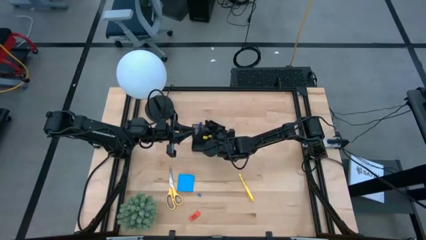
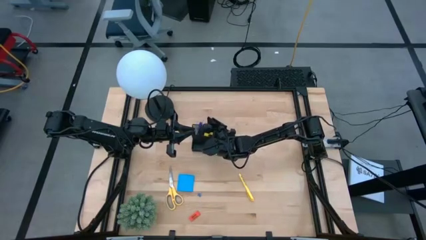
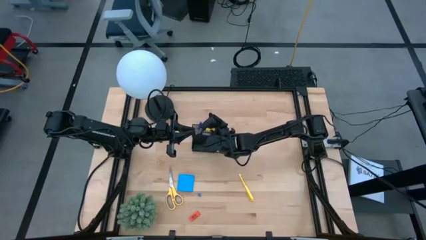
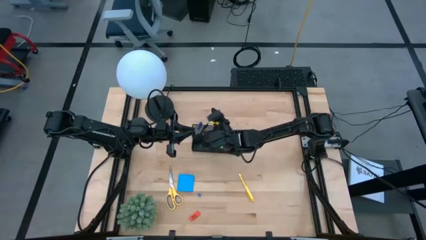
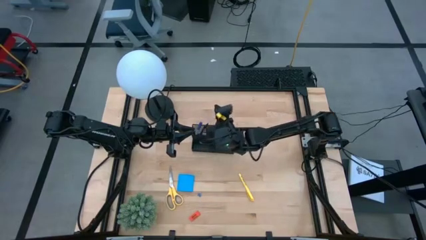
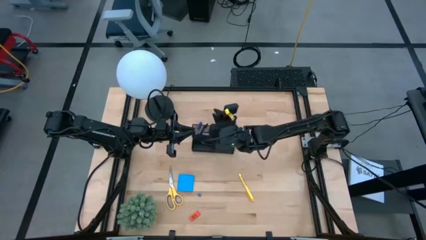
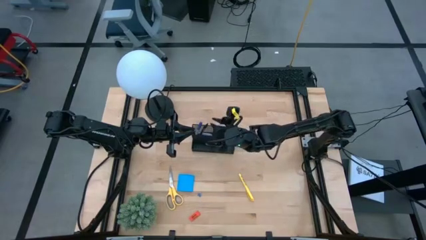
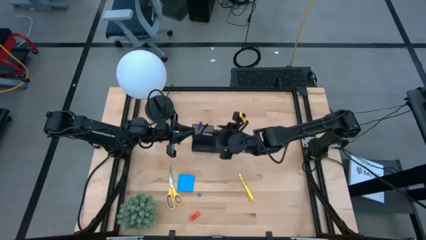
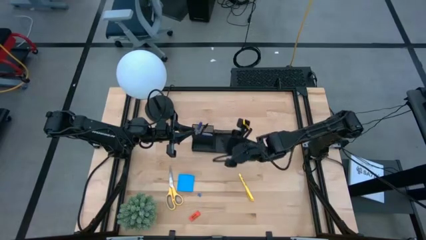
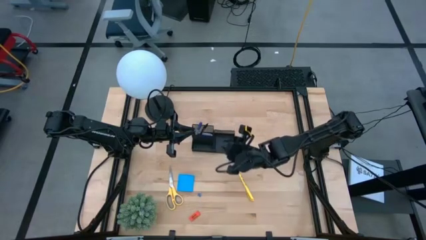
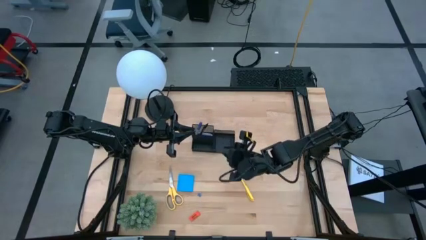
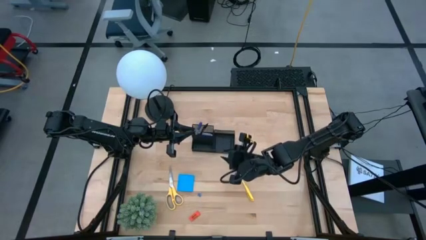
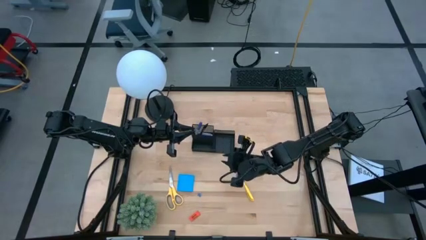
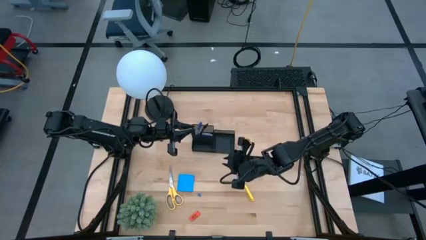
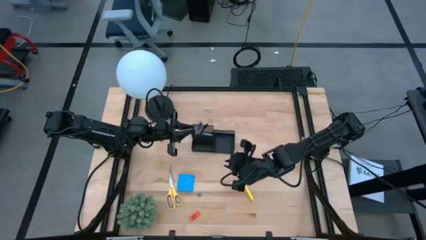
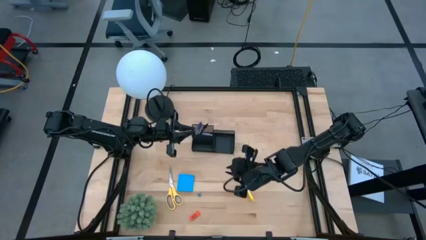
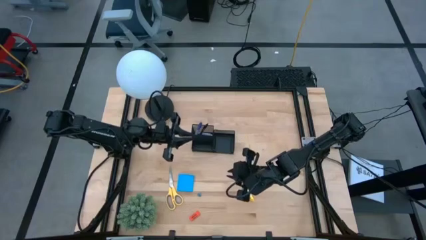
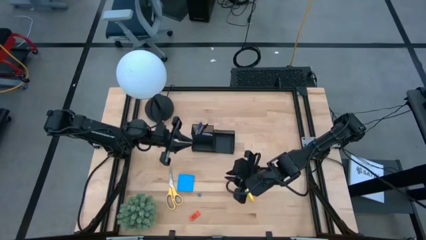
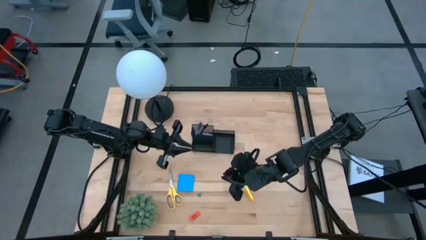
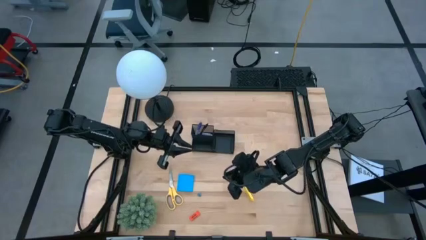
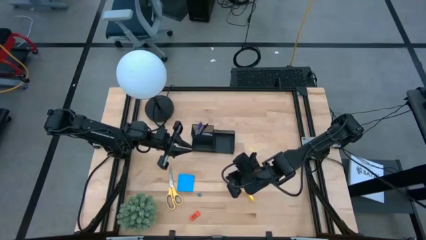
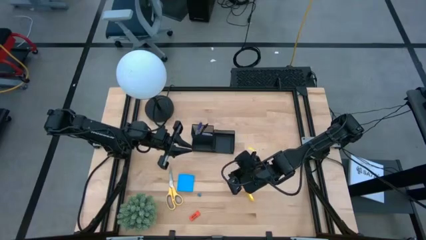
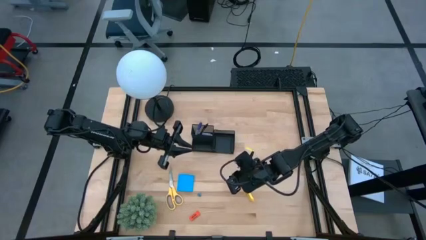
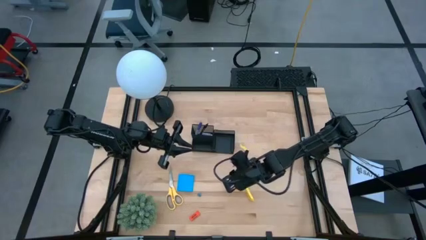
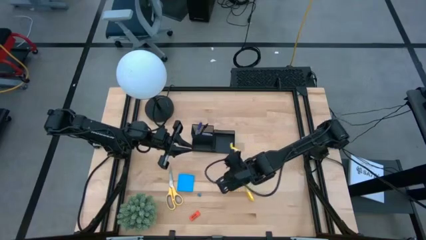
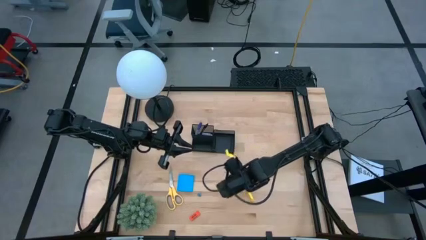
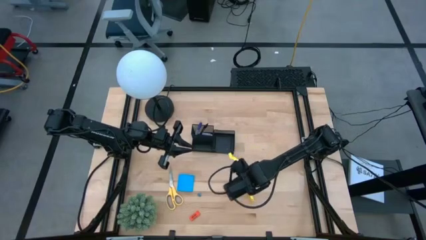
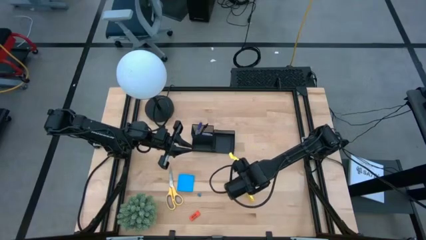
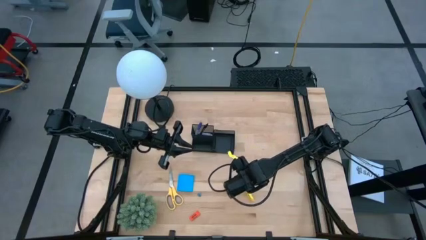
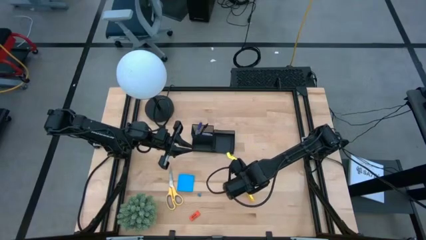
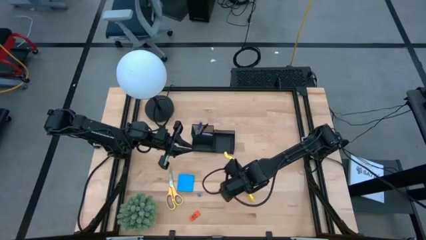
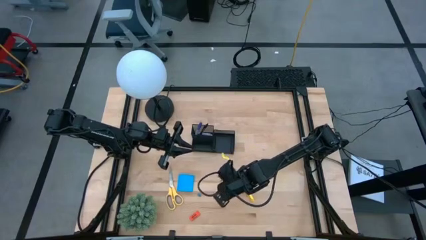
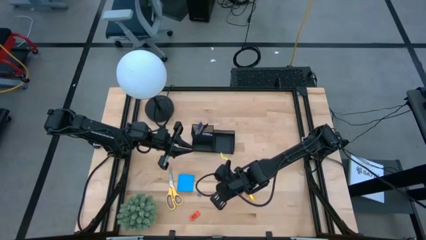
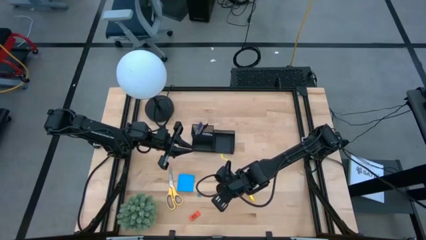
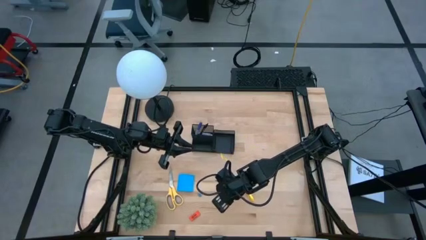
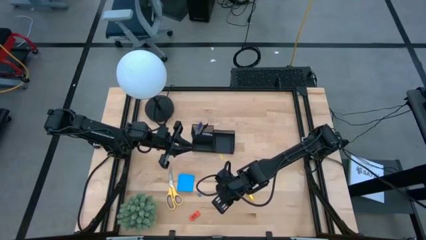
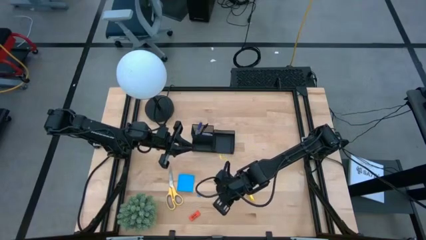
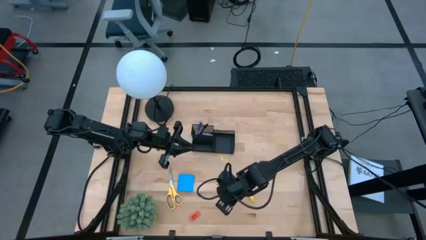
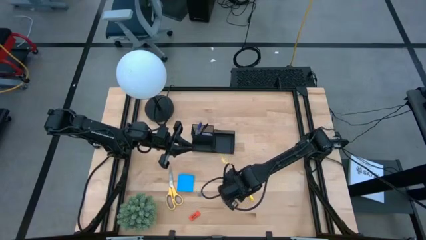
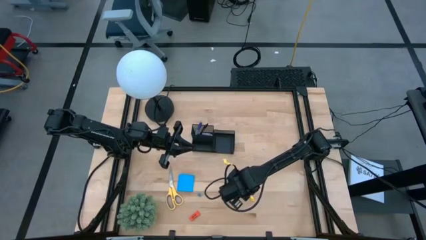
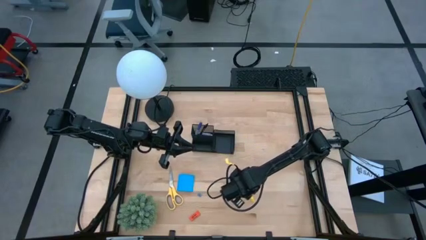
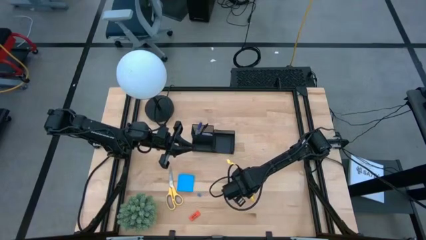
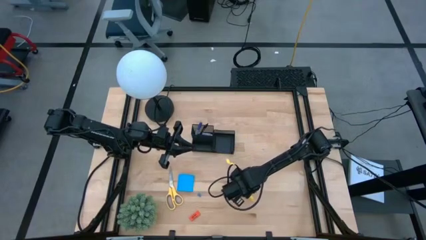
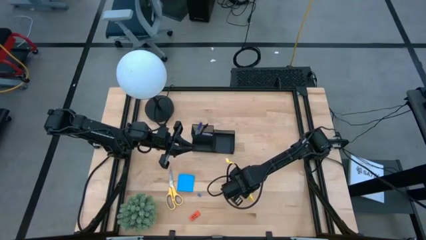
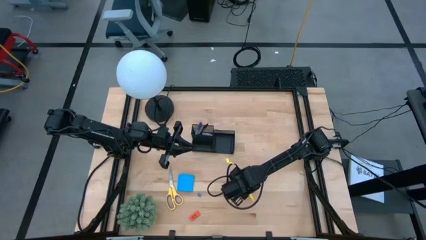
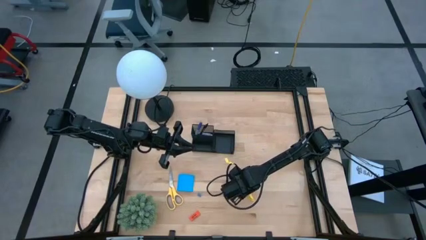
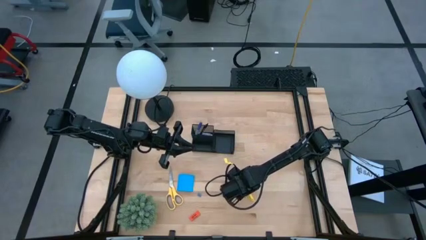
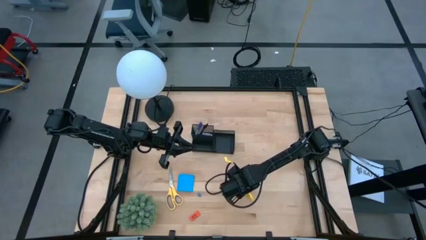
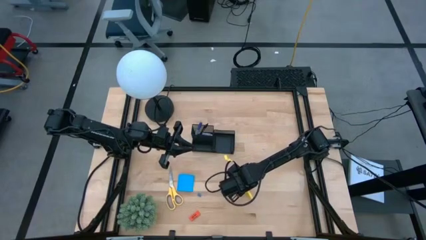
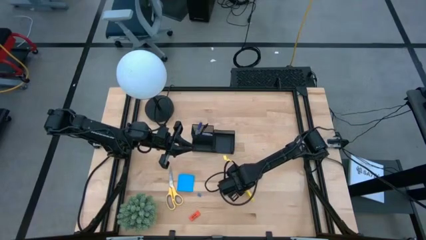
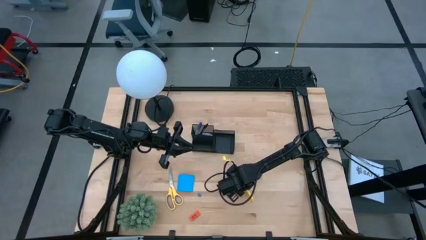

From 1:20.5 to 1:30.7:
Task: Pick and place office supplies into organizer
Put the yellow pen into the black desk organizer

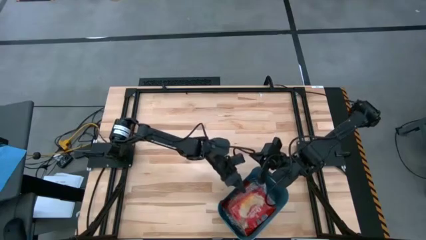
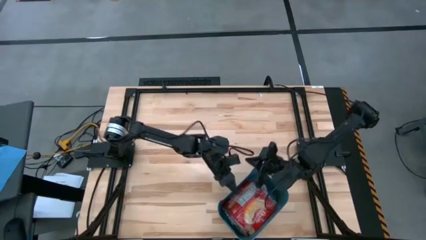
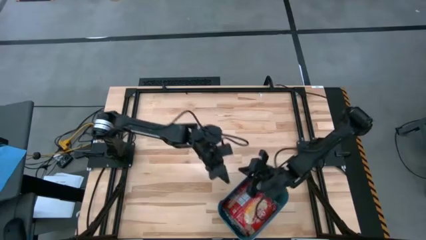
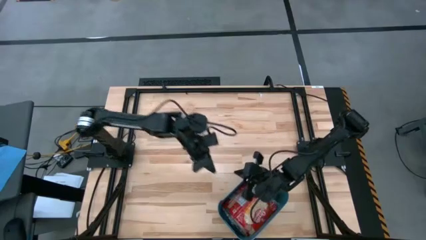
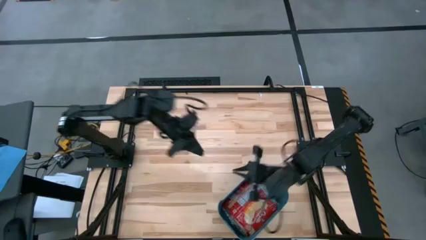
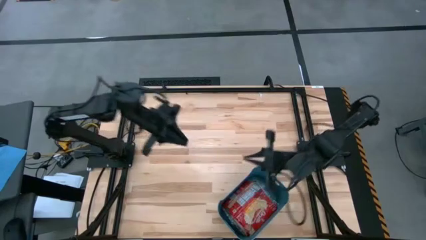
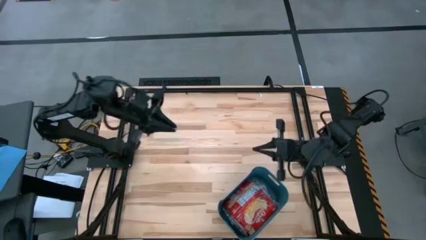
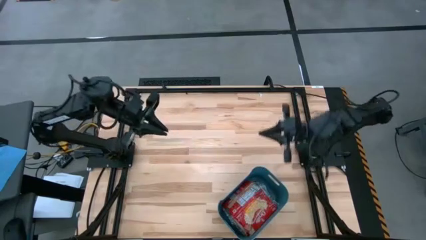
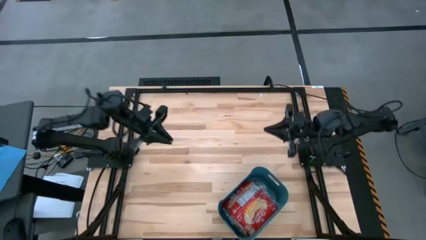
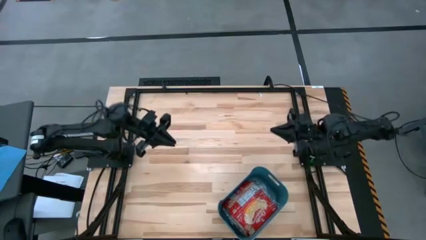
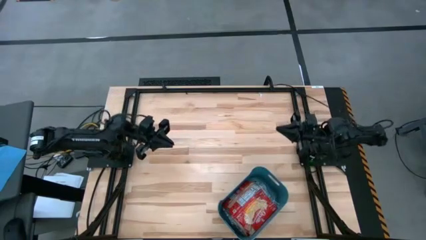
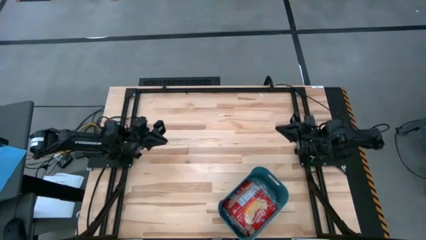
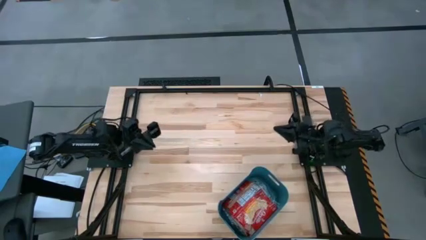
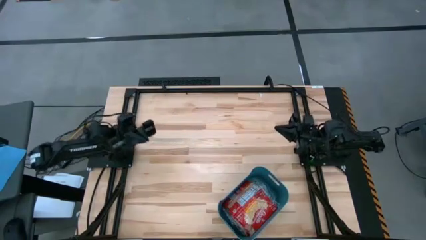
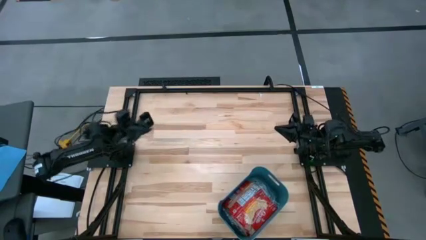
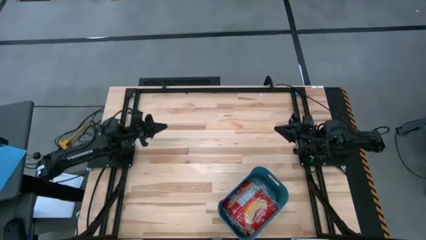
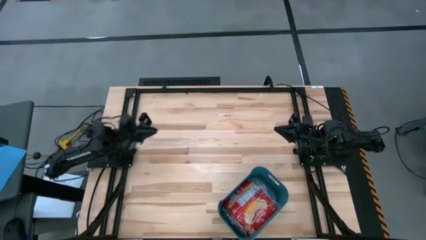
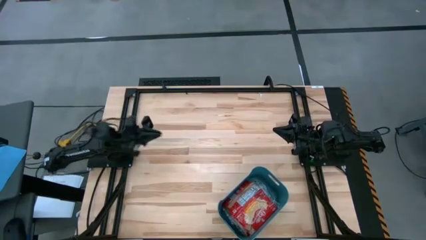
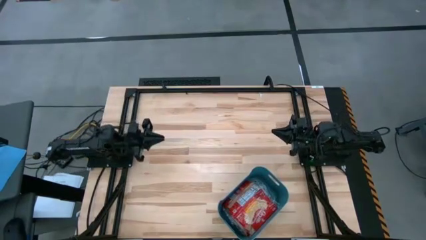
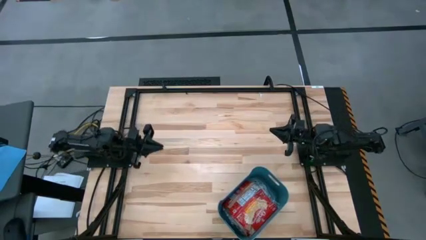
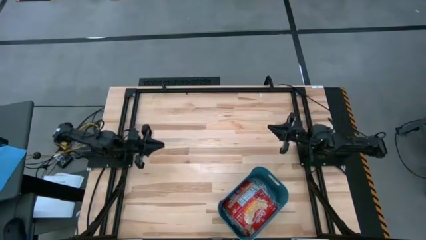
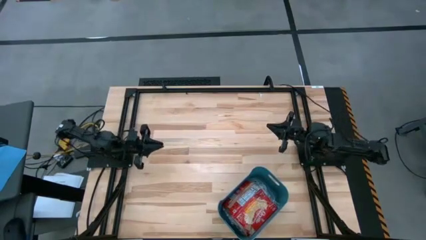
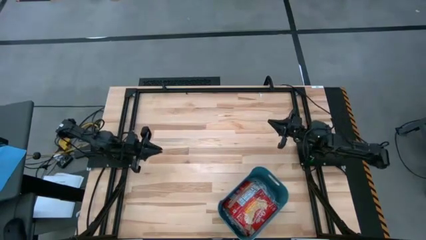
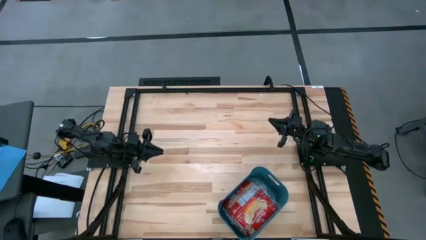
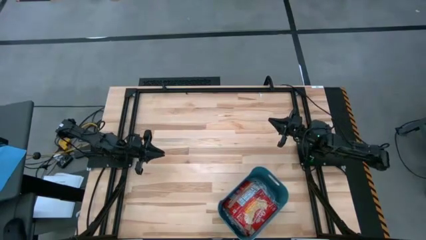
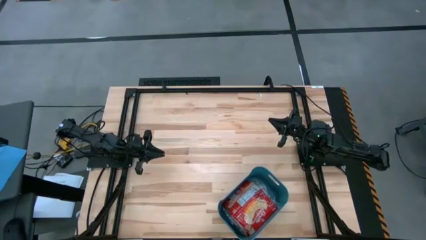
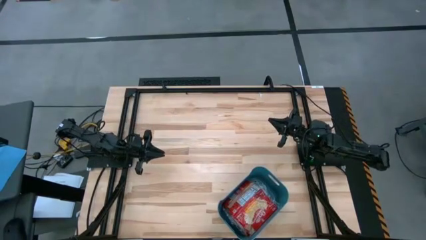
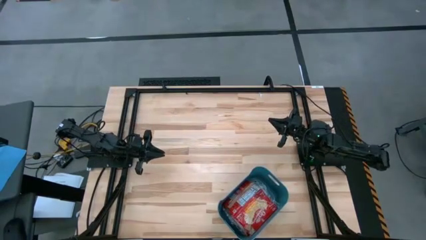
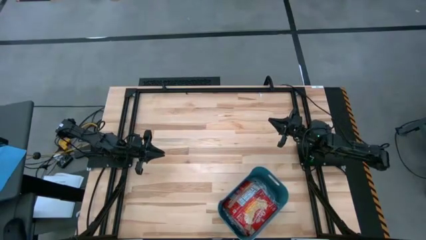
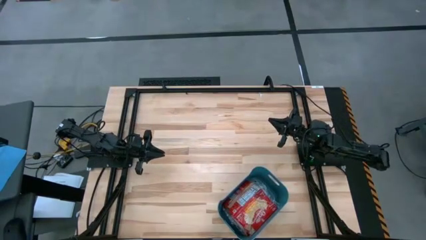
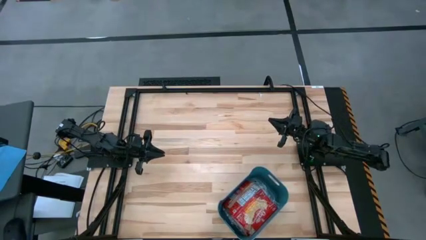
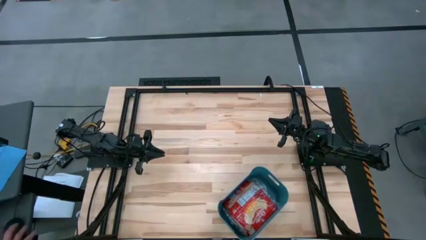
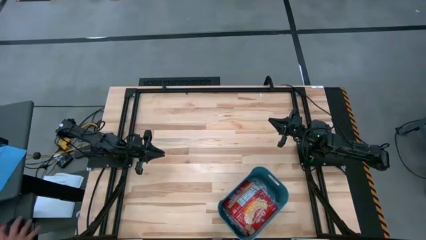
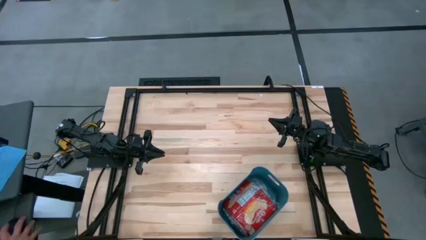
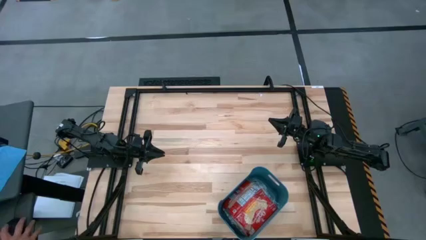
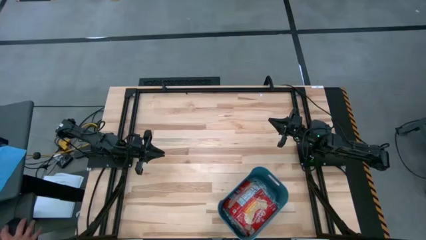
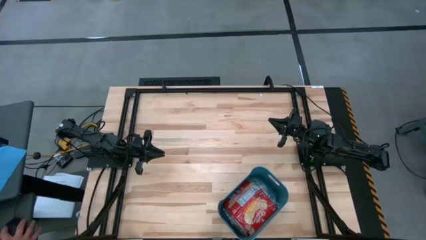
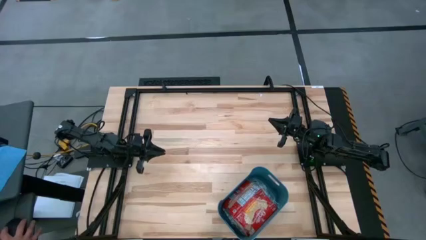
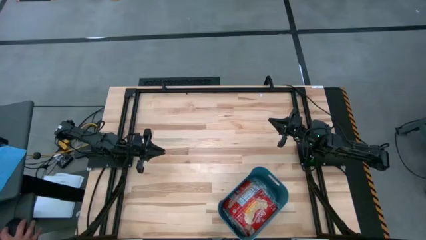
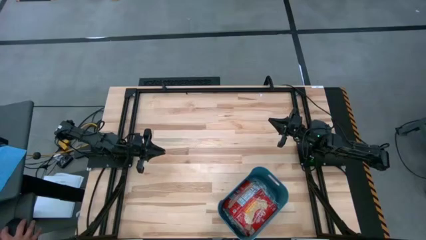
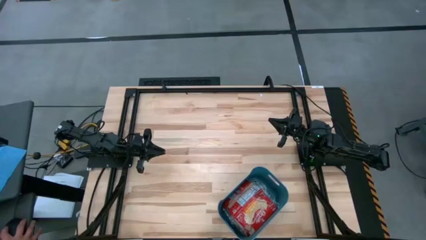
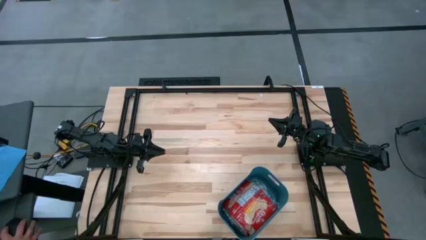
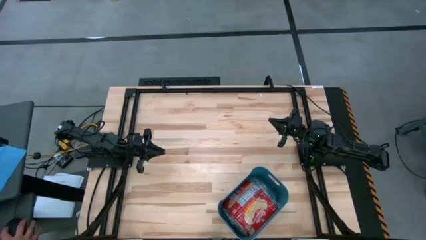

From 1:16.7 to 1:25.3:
Task: Sort popcorn bags into baskets
Return to Home Position
